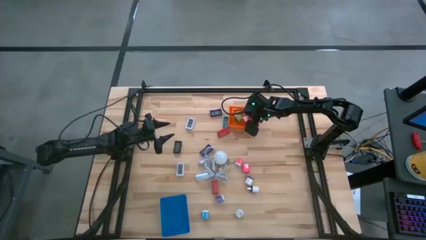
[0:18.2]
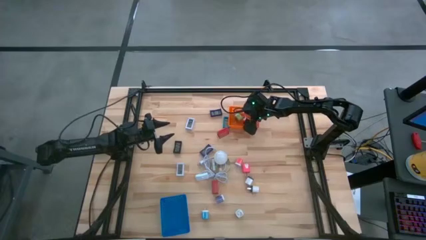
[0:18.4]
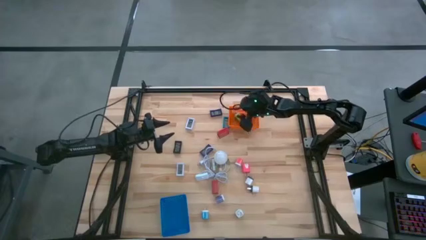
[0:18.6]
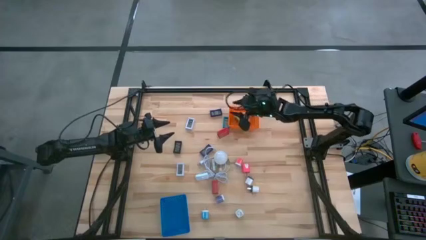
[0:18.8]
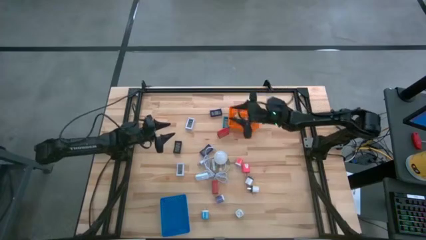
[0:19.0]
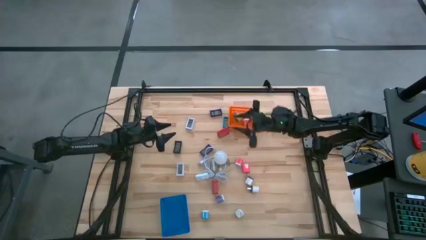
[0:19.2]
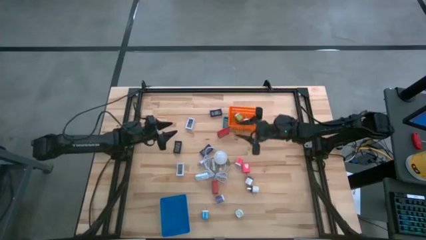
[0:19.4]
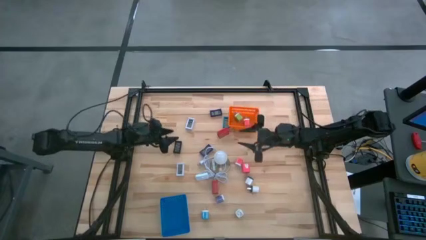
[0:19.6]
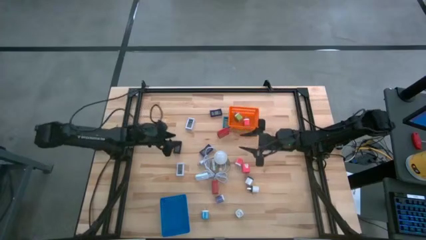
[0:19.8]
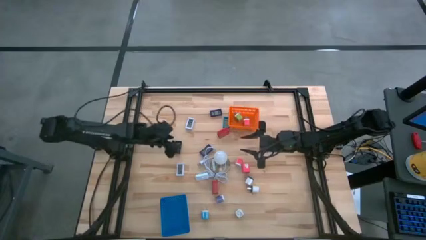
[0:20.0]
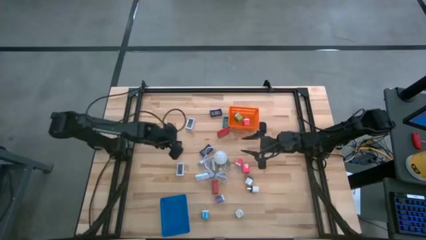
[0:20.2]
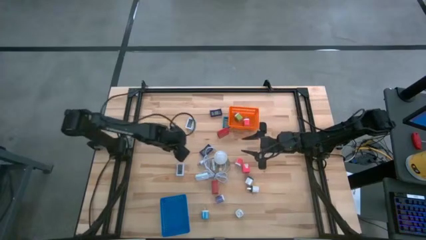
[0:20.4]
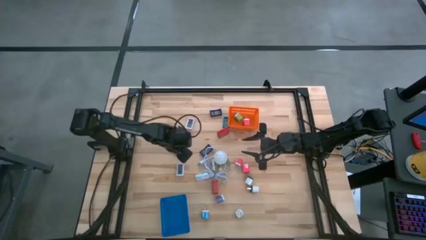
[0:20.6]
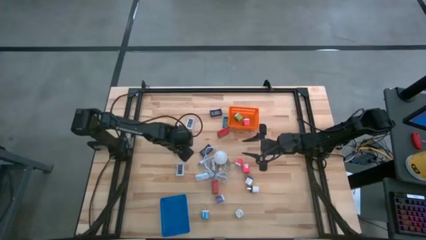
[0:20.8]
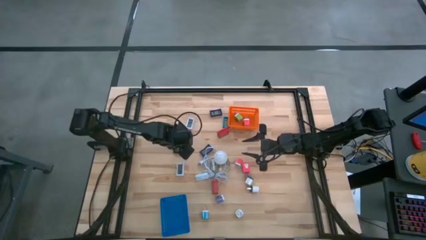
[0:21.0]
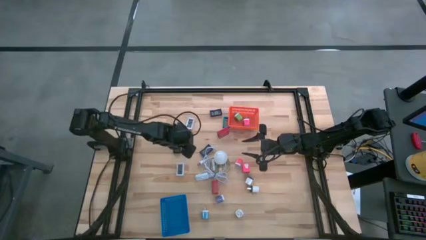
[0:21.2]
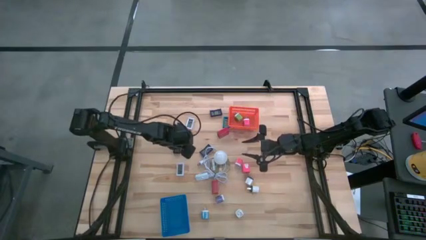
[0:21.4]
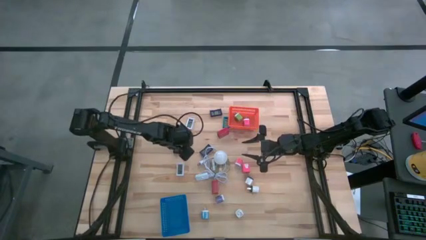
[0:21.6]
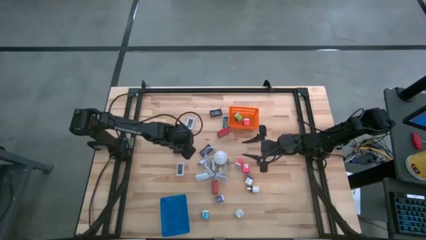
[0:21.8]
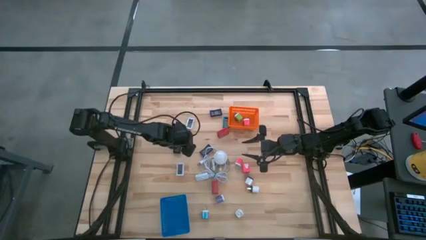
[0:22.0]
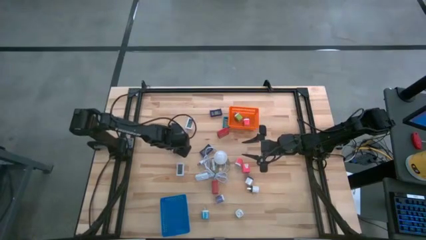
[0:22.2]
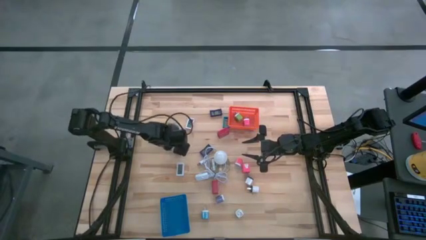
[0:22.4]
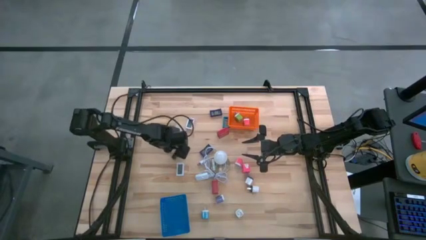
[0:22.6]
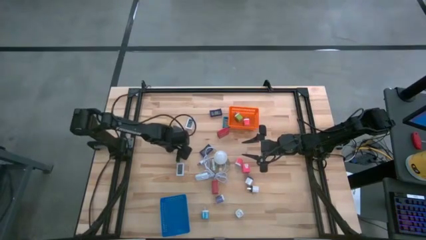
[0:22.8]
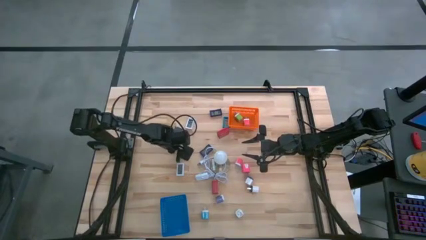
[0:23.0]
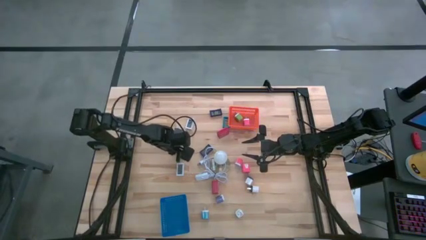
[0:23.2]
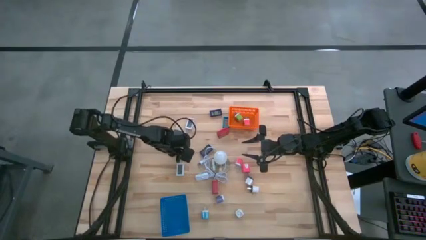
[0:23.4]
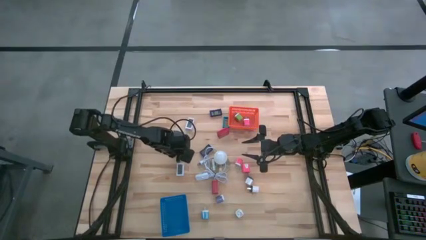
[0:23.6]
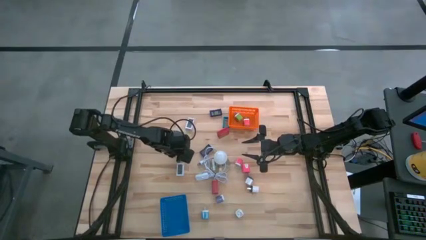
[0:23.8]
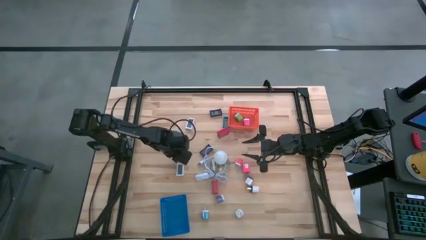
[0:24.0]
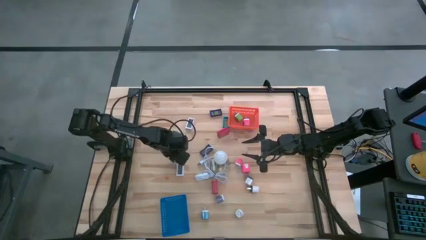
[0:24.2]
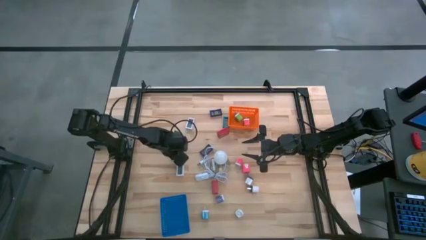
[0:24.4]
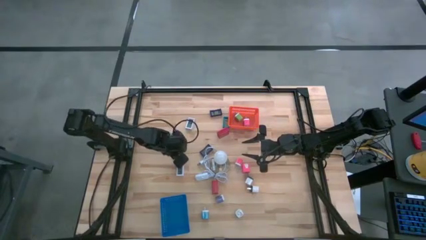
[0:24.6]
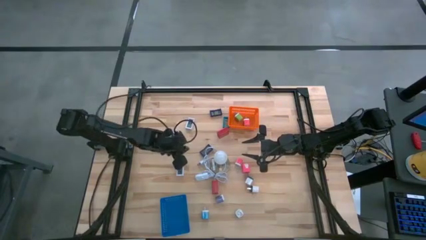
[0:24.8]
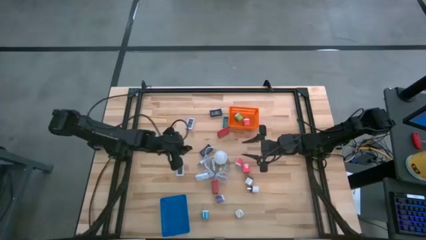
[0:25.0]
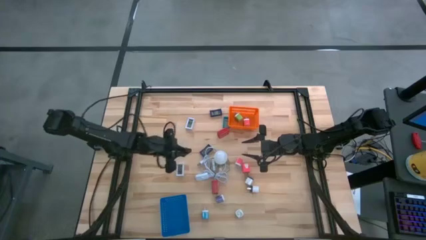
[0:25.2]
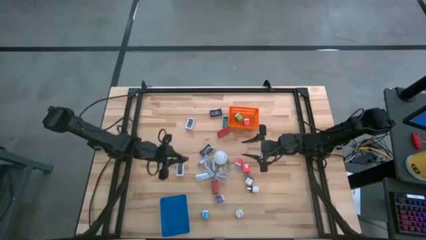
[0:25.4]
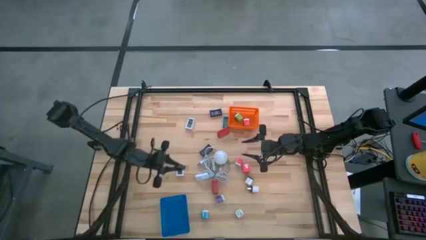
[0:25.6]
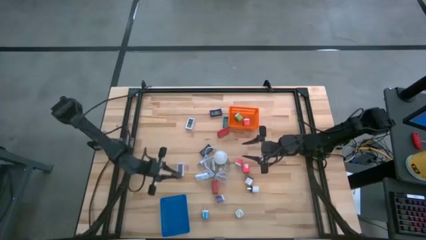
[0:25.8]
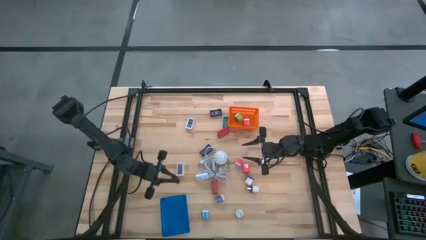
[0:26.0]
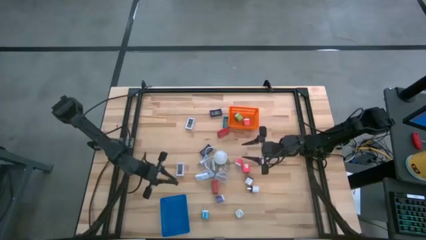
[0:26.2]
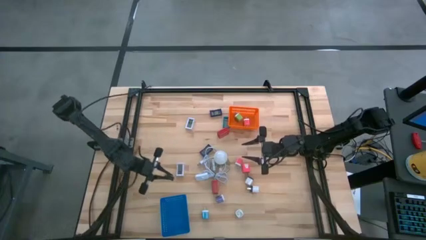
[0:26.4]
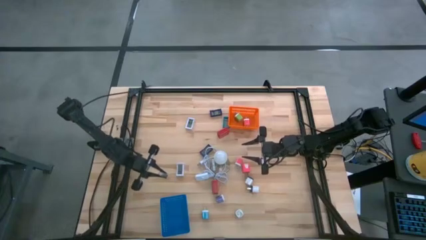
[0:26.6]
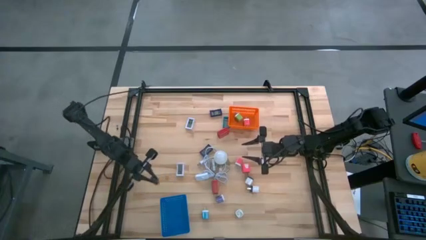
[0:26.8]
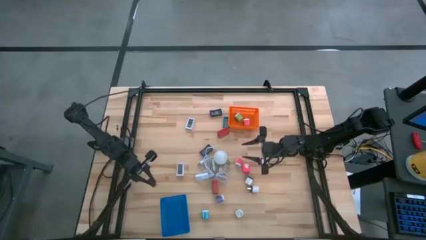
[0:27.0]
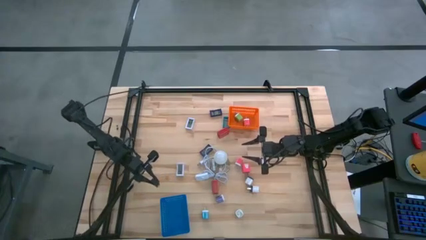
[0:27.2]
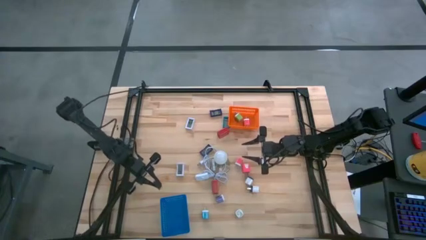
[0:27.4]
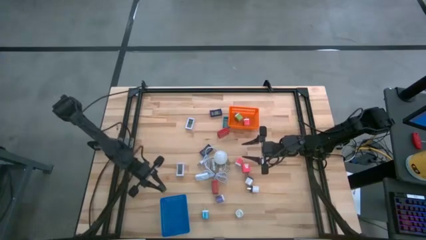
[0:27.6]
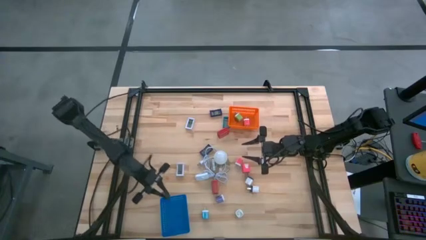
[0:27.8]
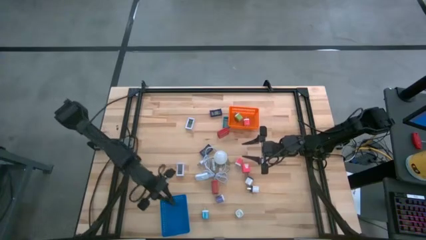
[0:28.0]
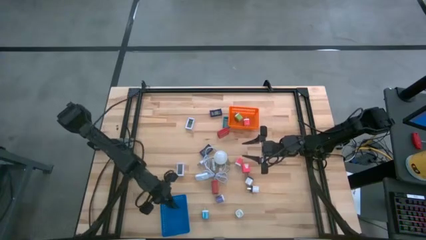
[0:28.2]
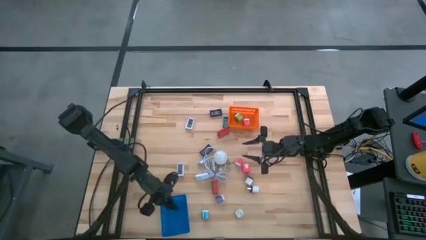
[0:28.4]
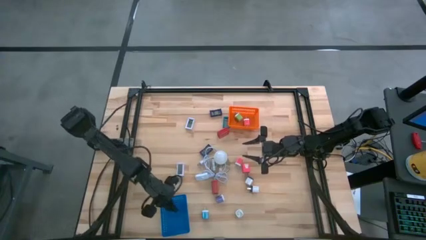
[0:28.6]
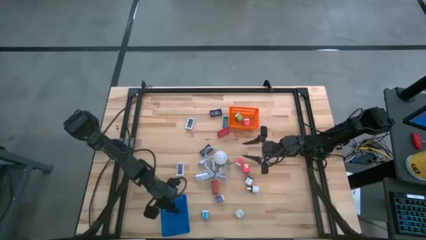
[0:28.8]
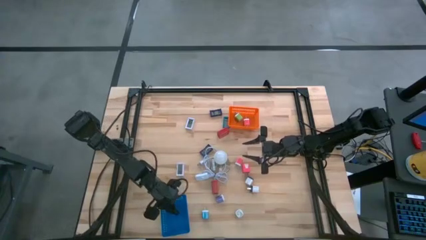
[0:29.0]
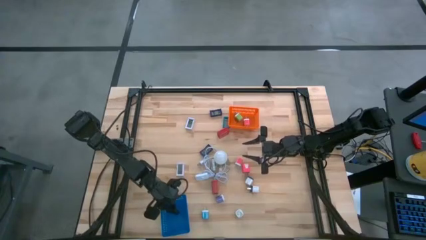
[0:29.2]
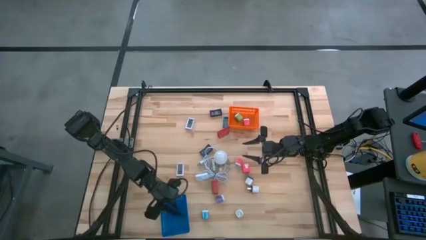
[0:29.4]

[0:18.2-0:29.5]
Task: Pick & Place Office items
Put the black timer into the blue bin
